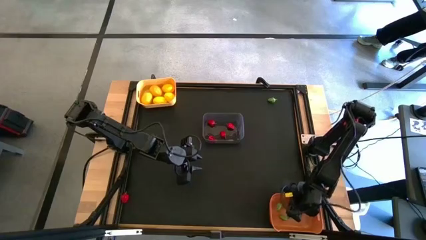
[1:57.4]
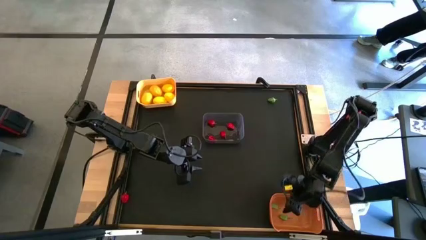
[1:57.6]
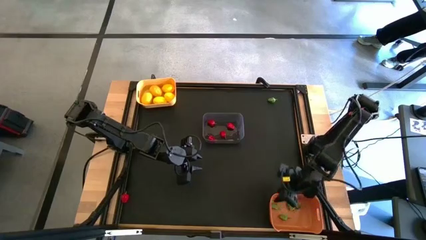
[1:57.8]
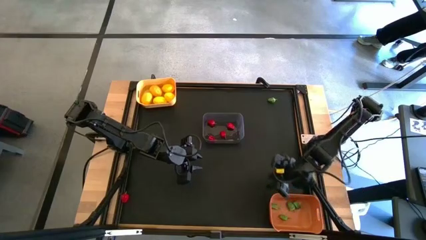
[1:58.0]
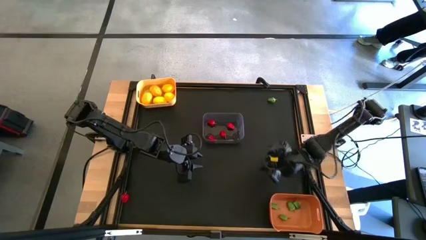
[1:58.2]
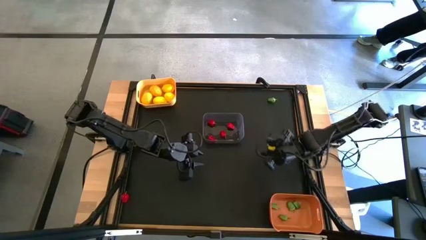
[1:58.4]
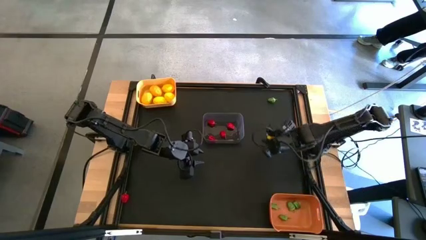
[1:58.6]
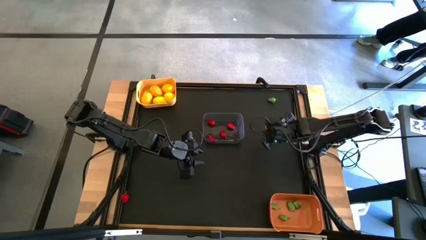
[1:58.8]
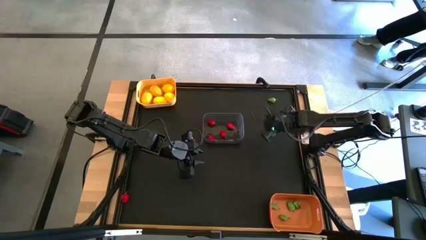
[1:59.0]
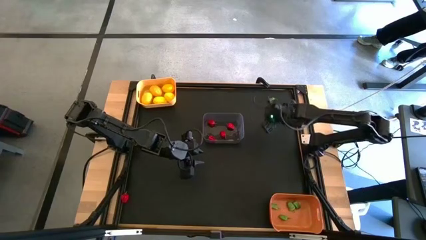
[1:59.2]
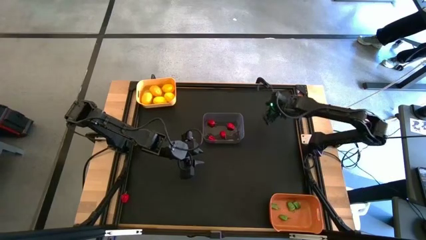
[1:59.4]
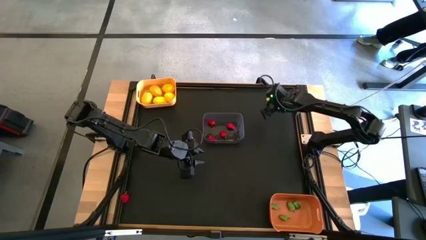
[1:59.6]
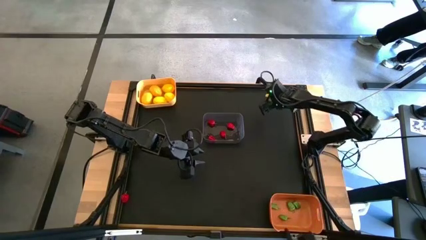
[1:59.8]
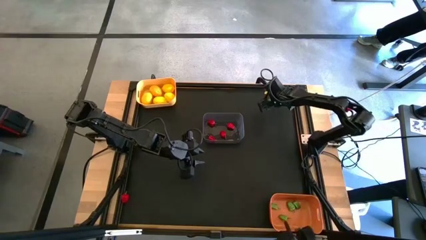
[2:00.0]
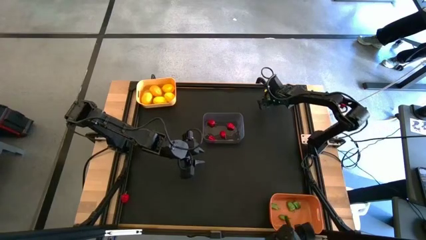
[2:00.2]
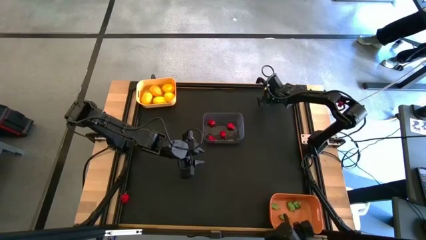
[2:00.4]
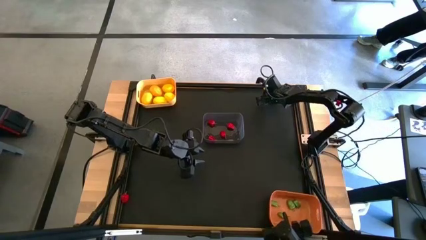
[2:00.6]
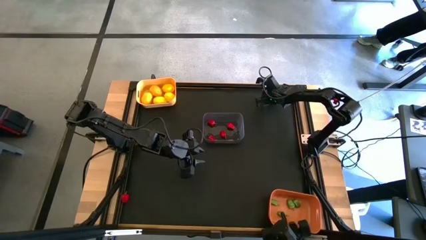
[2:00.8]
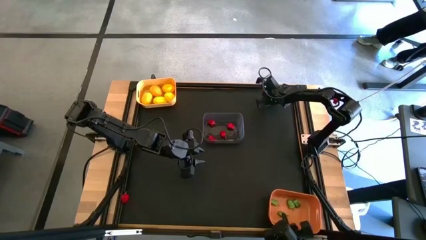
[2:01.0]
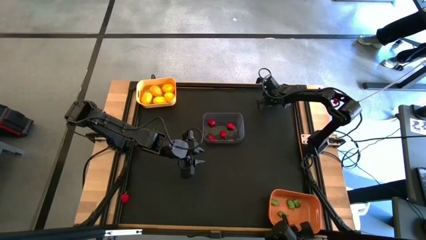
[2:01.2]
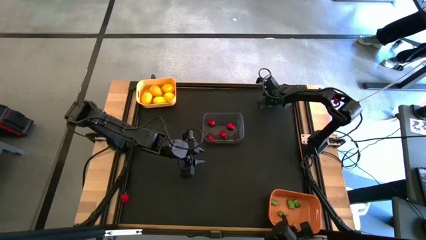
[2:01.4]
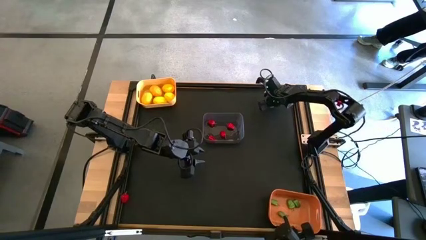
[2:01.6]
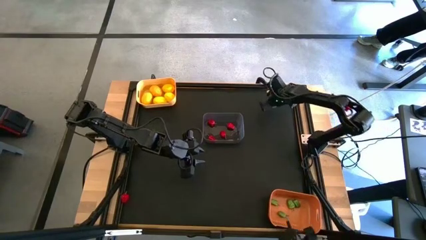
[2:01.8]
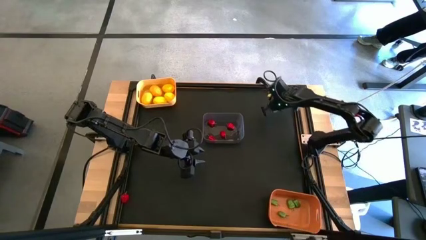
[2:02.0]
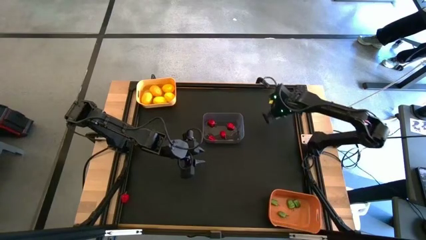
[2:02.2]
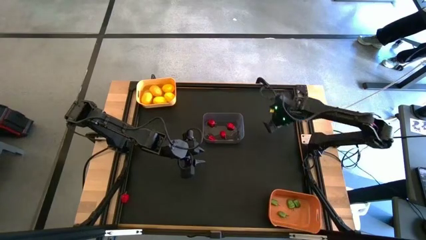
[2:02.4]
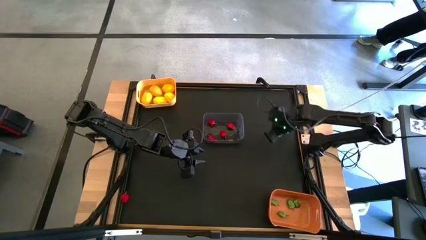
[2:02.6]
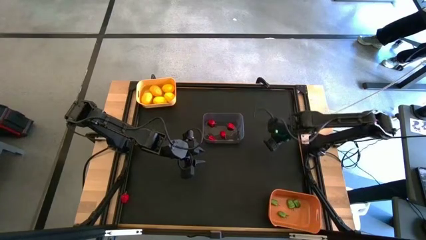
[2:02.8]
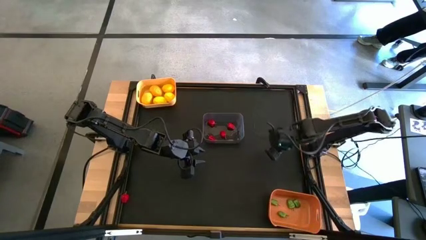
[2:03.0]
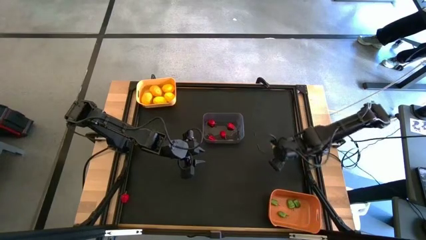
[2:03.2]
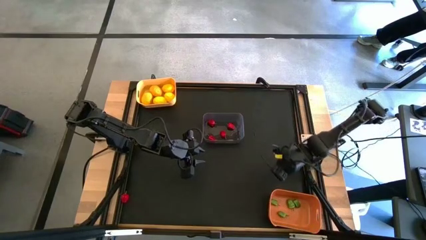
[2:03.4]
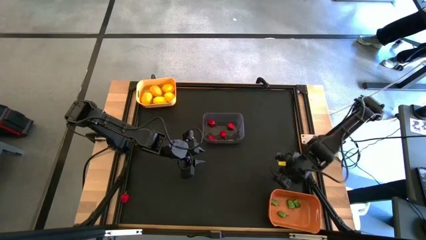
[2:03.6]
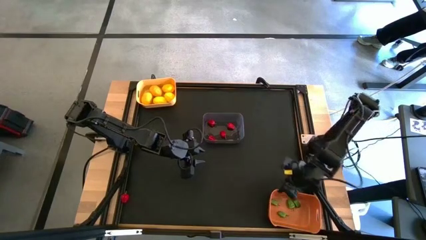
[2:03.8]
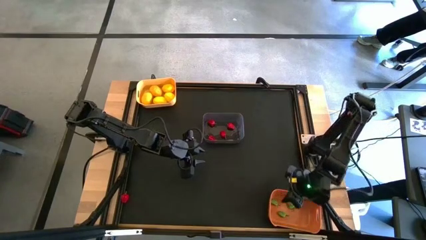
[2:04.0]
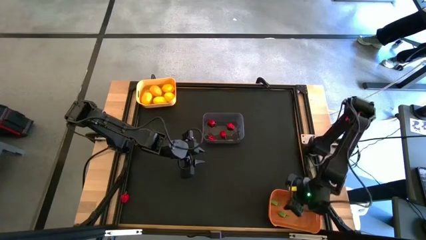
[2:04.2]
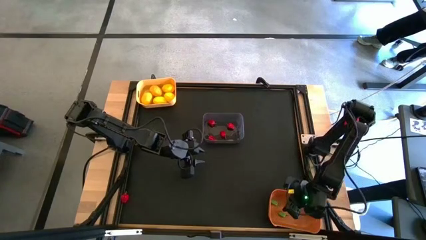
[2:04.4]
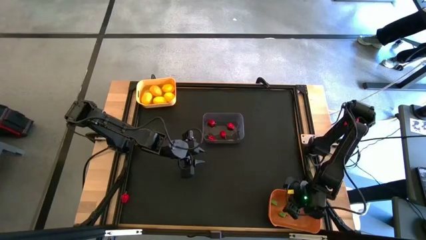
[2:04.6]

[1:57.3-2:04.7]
Task: Sort produce into baskets
Put the green bell pepper into the orange bin

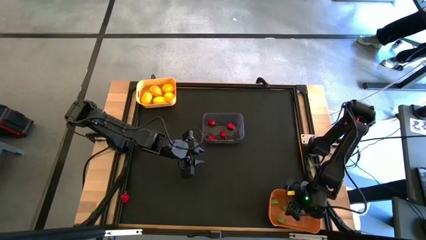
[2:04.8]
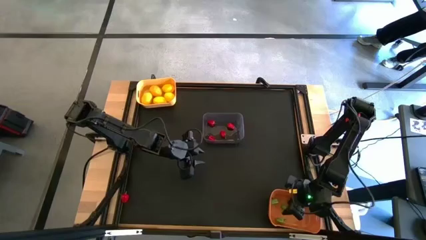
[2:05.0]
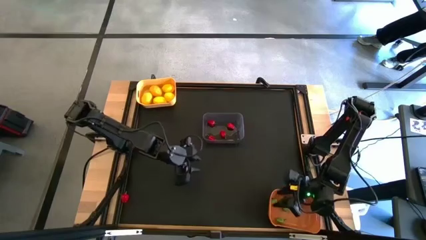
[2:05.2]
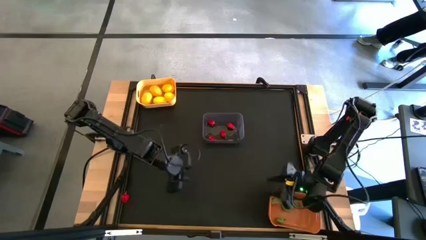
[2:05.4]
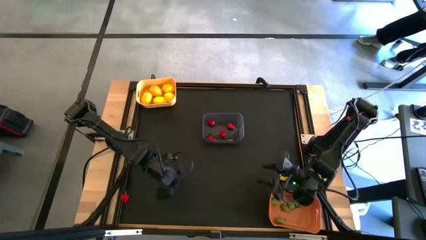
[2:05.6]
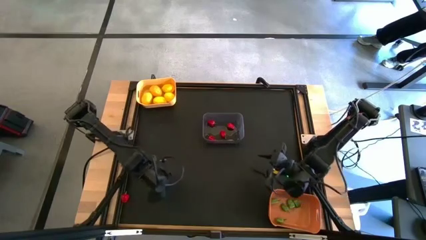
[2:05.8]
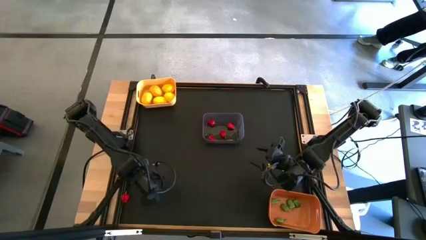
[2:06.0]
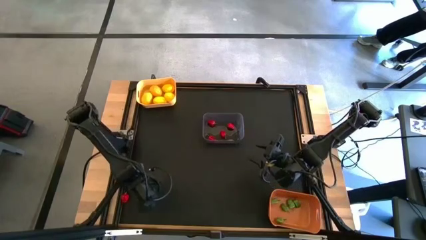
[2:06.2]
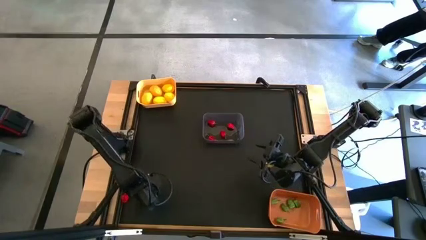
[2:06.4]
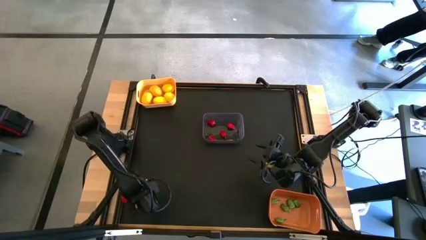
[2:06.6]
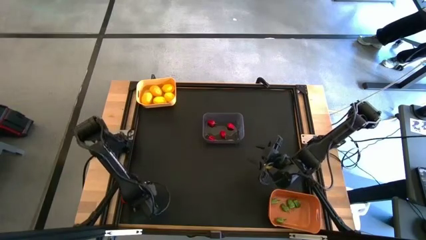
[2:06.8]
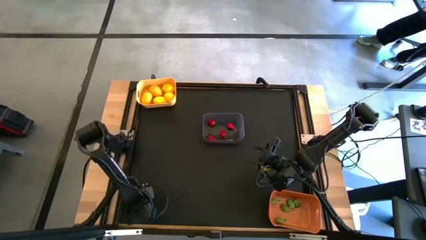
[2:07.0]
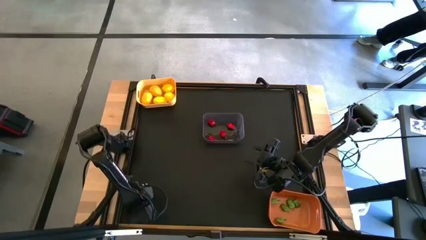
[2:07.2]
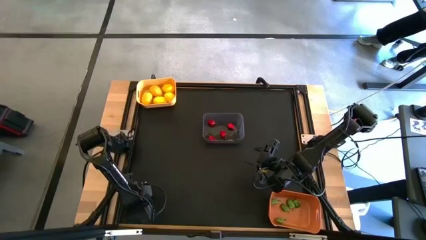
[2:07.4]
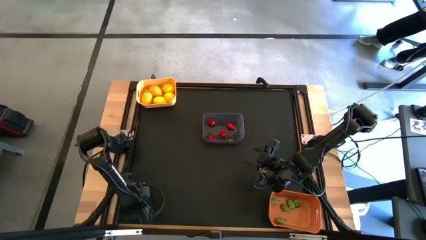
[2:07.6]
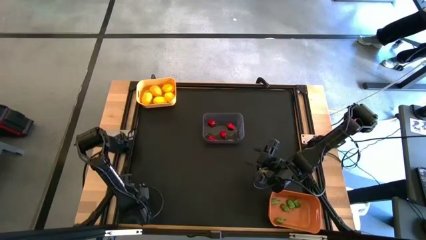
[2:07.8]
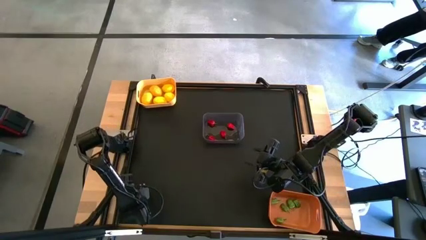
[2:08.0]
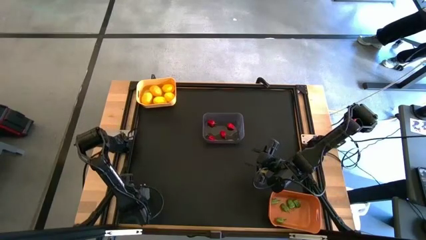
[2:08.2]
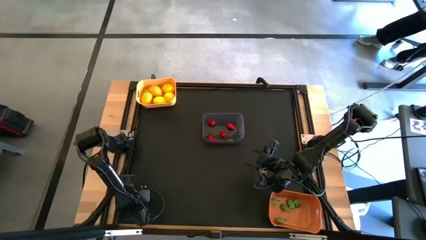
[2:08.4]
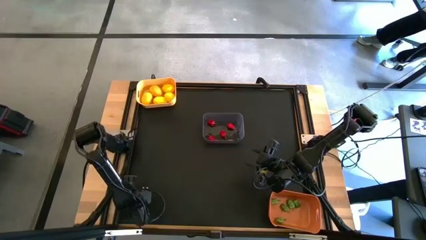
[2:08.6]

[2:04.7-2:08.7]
Put the red bell pepper into the transparent bin

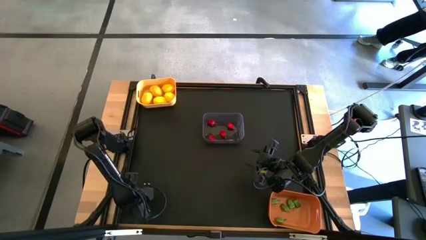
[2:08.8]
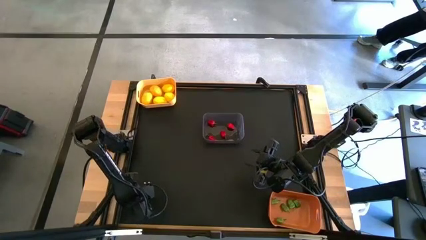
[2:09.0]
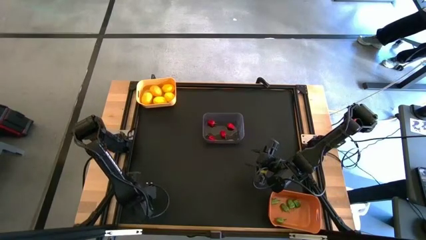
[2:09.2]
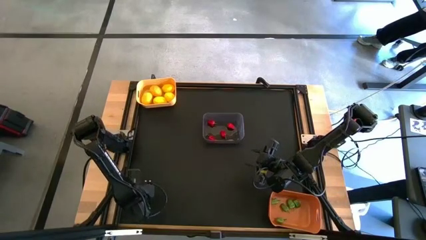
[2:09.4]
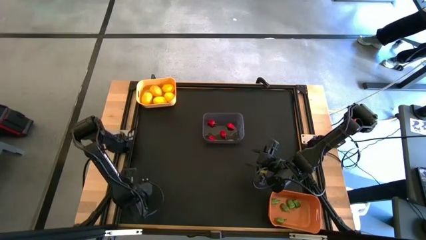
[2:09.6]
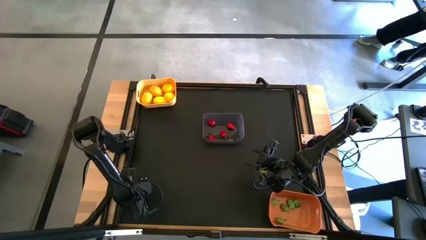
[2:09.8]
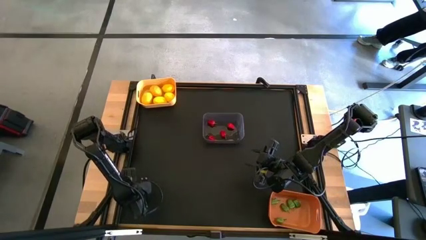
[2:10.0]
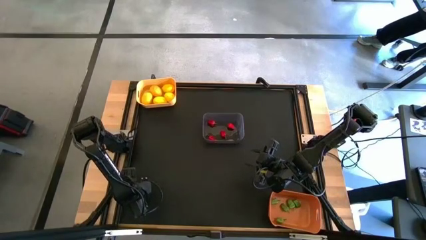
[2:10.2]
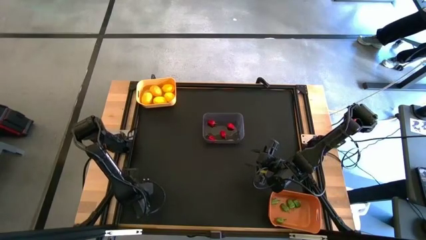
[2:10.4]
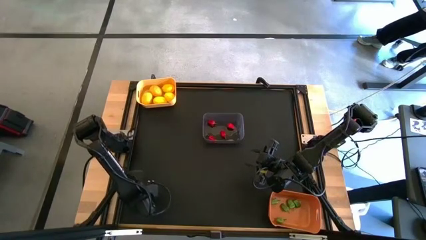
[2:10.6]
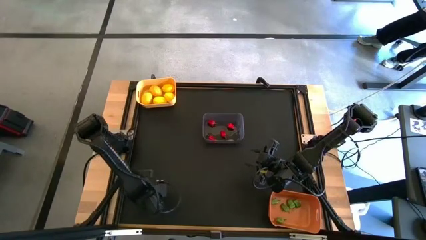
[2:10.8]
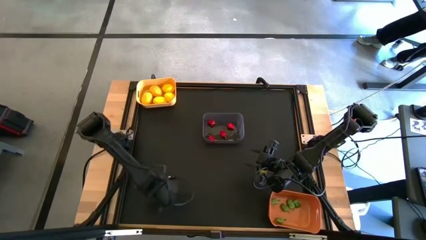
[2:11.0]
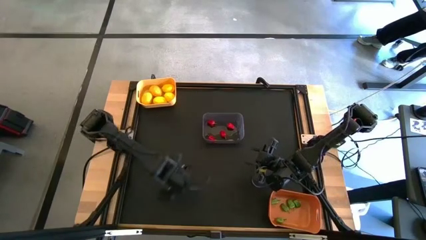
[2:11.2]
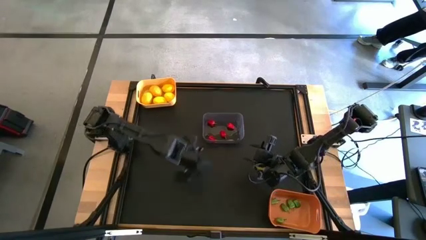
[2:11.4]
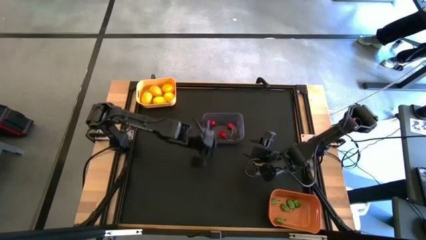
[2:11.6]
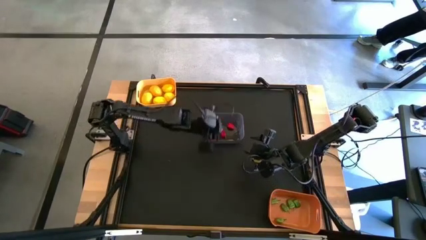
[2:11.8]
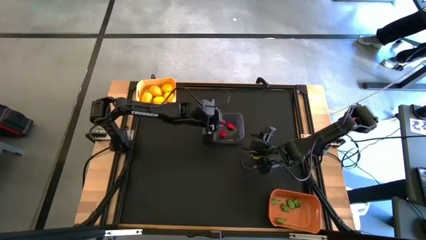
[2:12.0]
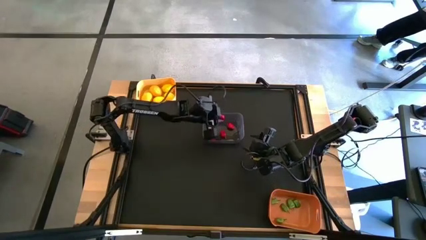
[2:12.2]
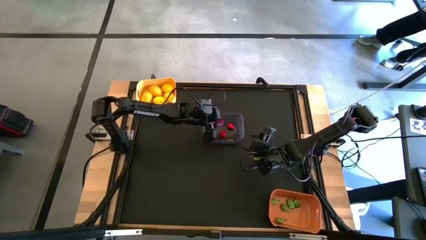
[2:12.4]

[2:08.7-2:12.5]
Put the red bell pepper into the transparent bin
